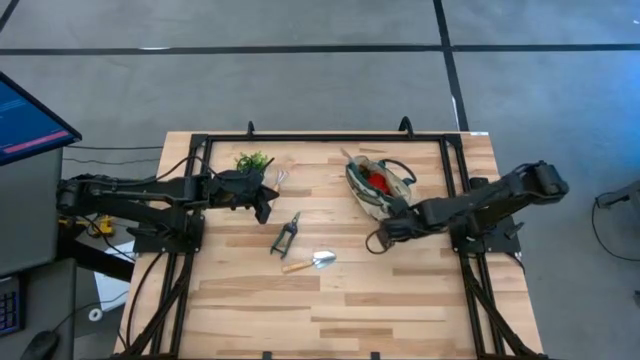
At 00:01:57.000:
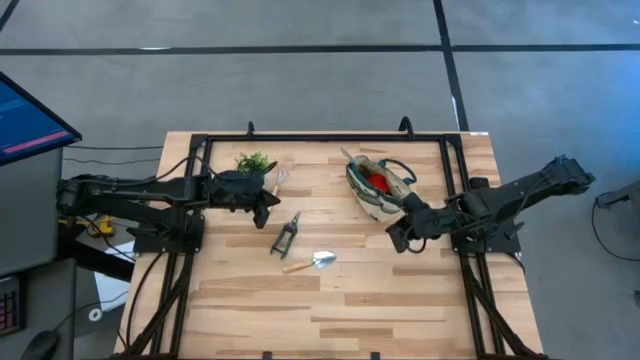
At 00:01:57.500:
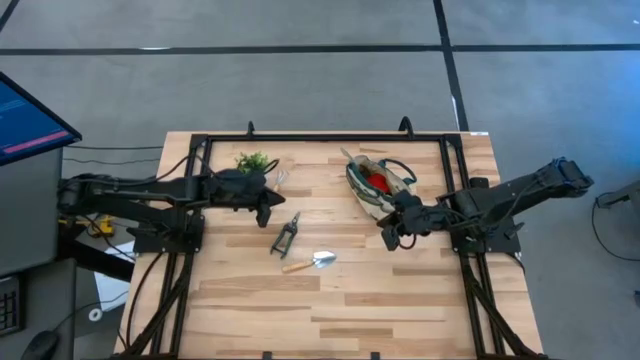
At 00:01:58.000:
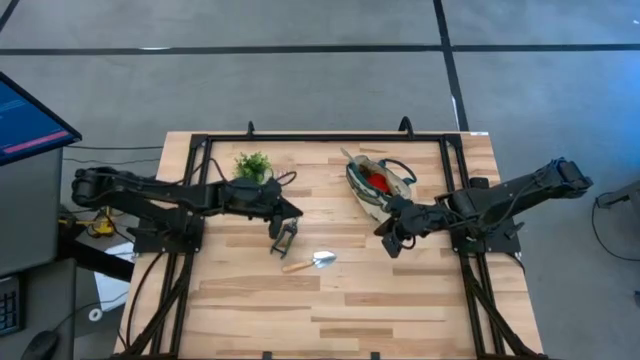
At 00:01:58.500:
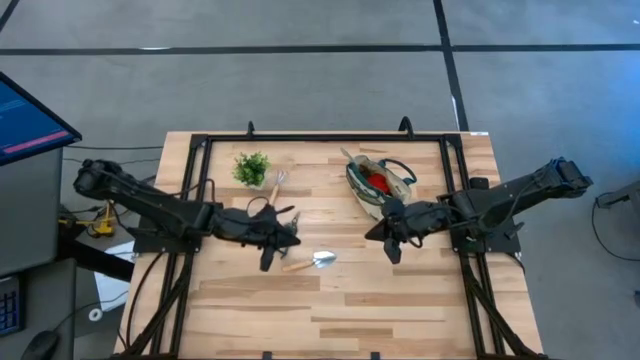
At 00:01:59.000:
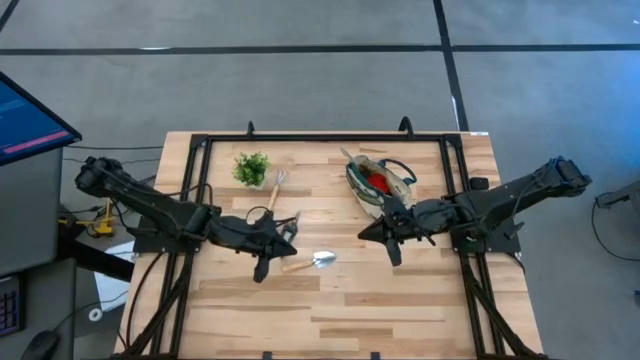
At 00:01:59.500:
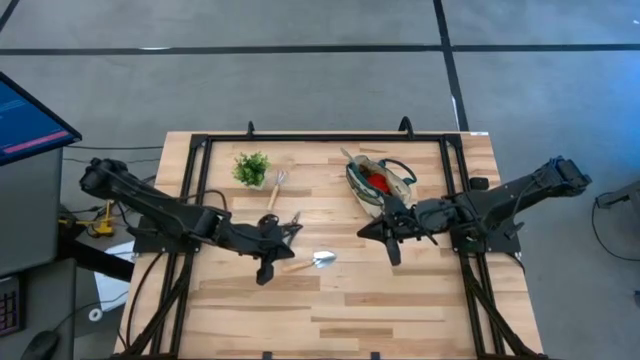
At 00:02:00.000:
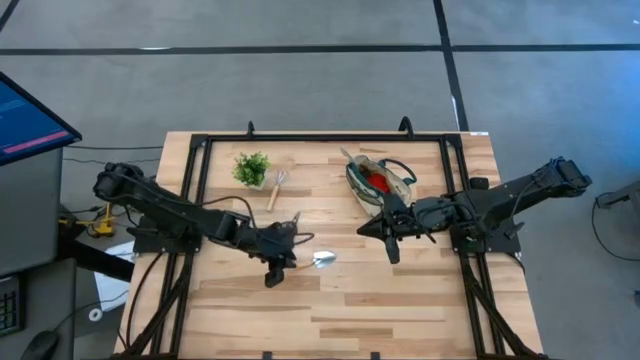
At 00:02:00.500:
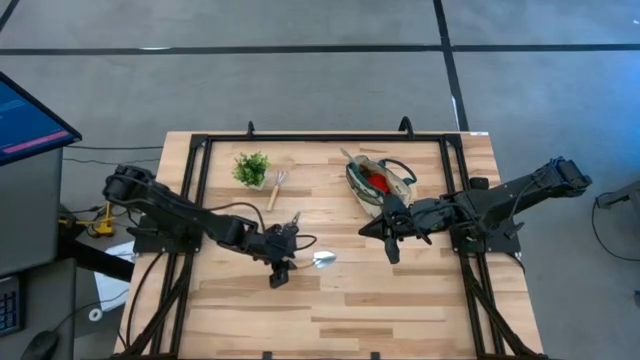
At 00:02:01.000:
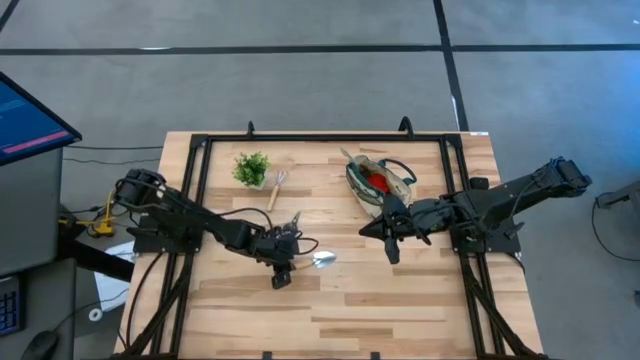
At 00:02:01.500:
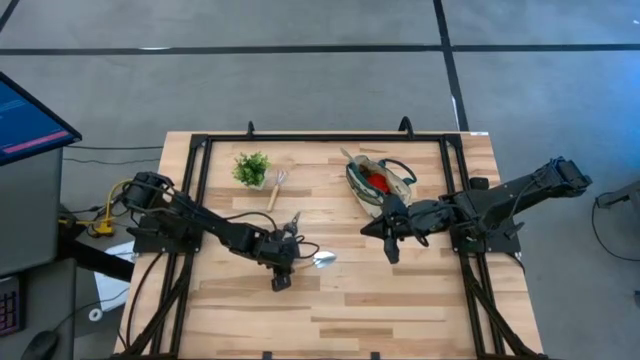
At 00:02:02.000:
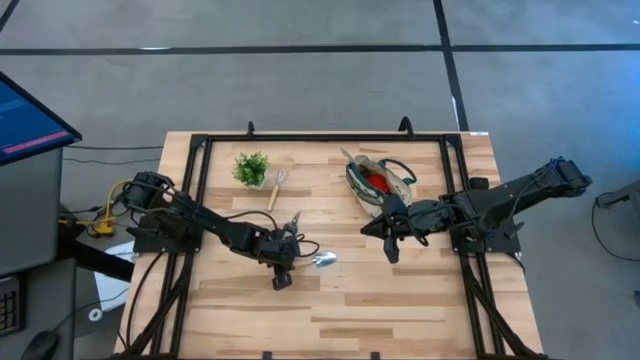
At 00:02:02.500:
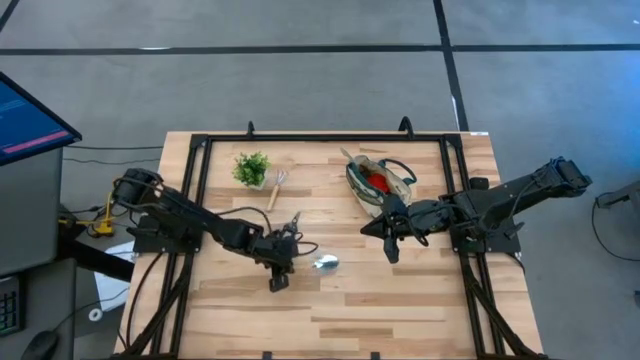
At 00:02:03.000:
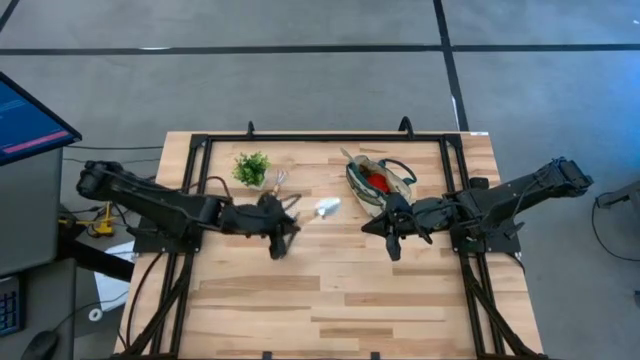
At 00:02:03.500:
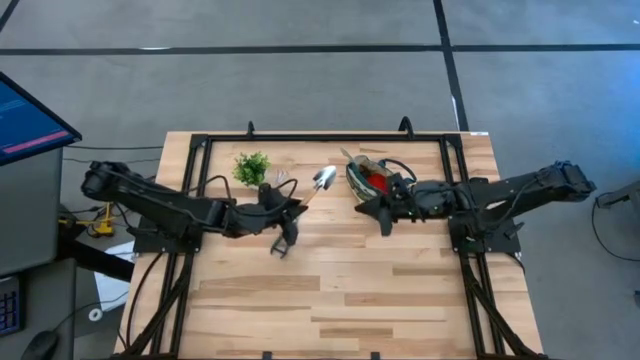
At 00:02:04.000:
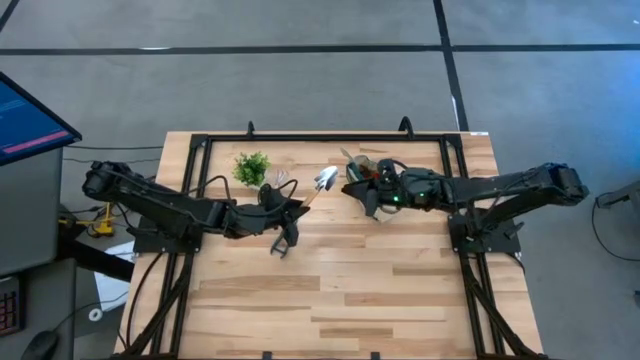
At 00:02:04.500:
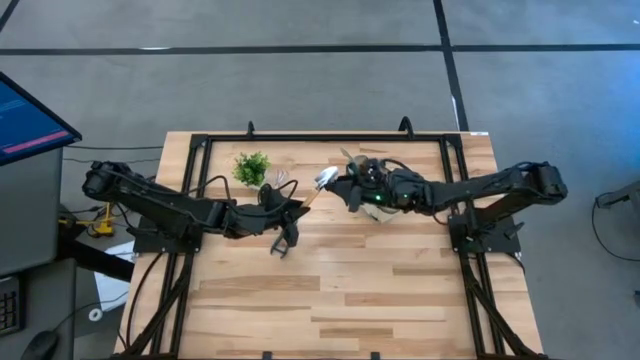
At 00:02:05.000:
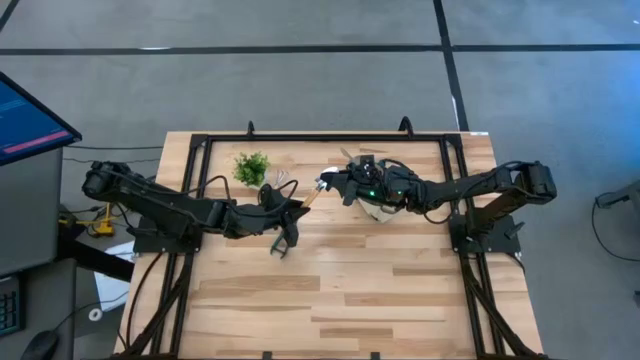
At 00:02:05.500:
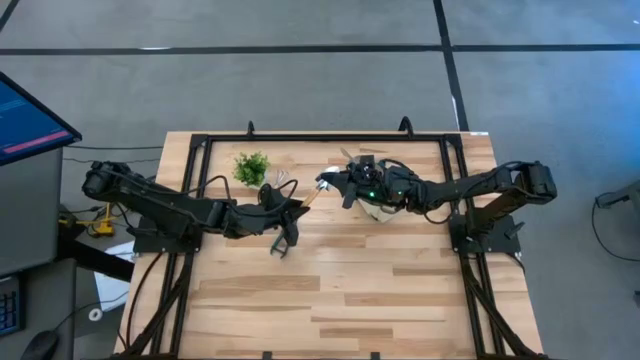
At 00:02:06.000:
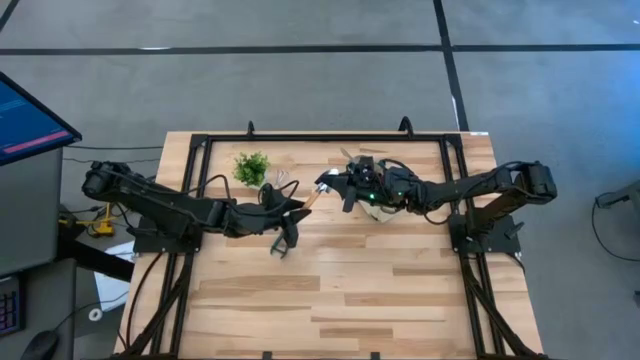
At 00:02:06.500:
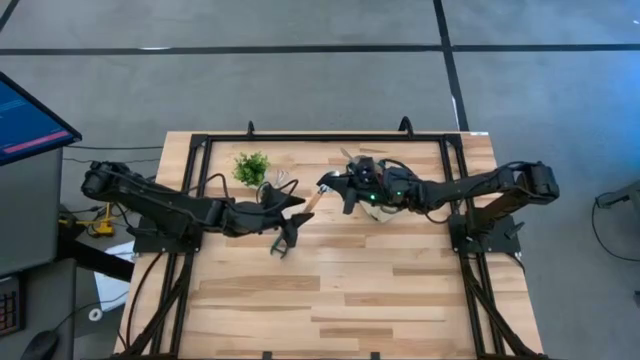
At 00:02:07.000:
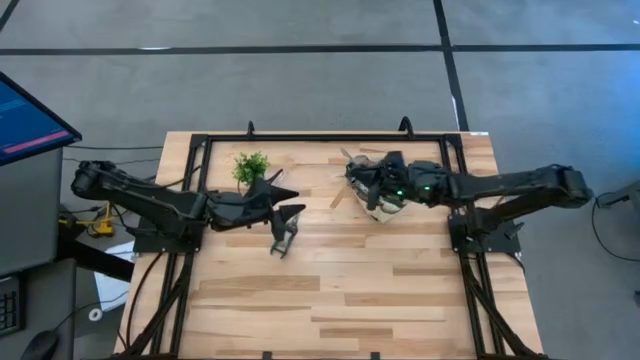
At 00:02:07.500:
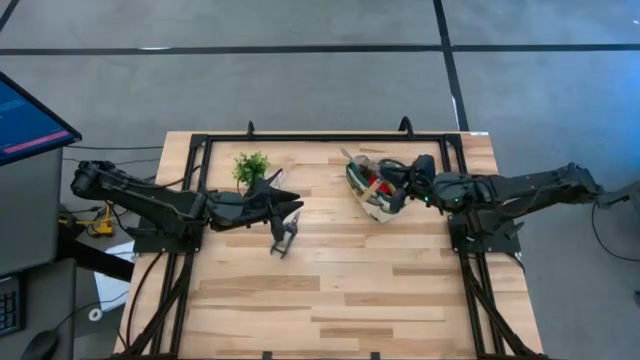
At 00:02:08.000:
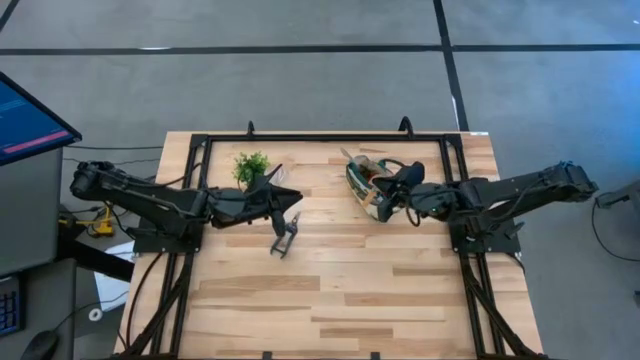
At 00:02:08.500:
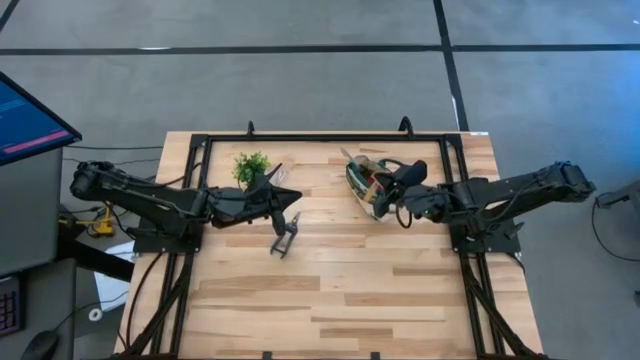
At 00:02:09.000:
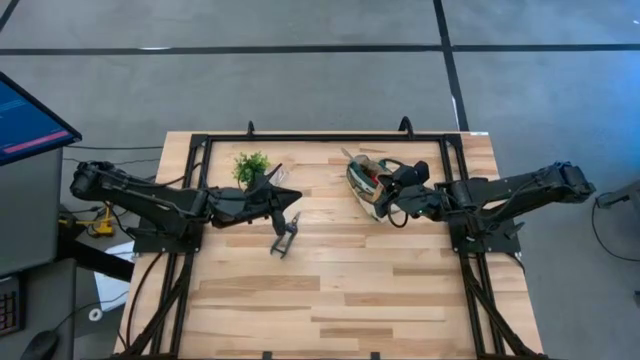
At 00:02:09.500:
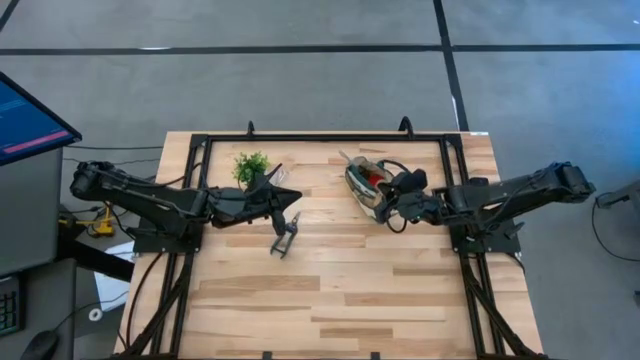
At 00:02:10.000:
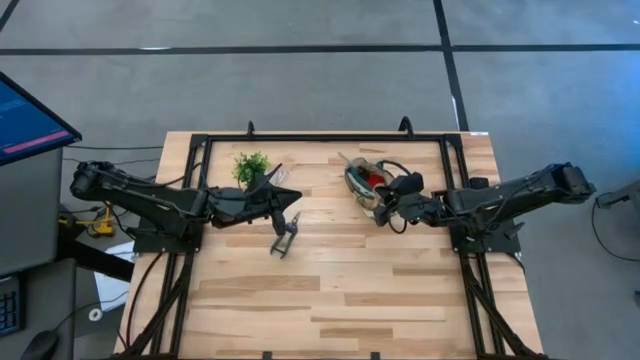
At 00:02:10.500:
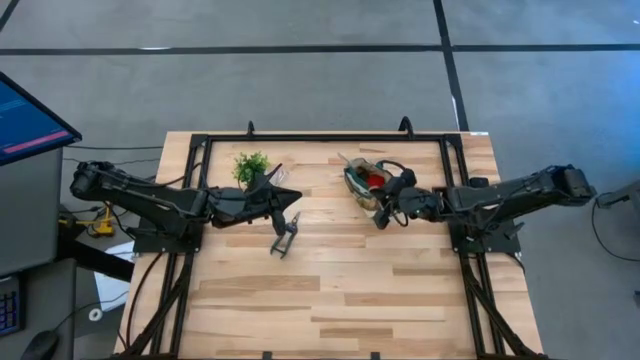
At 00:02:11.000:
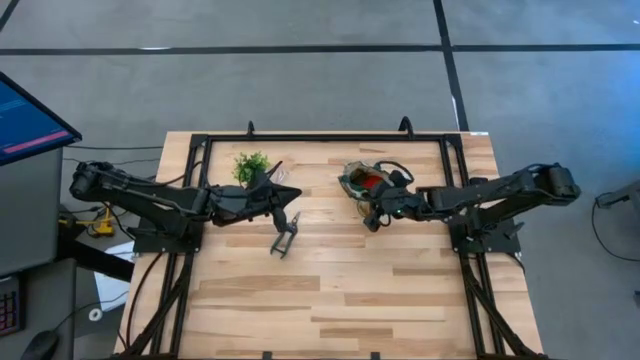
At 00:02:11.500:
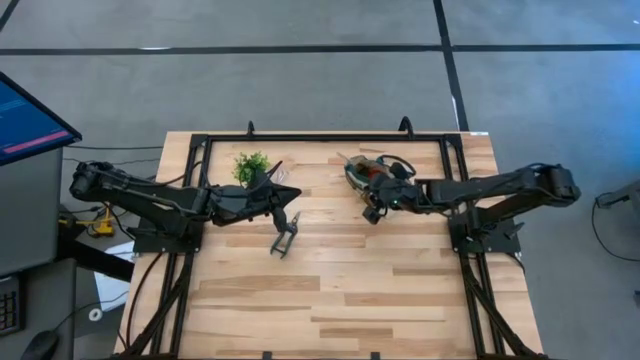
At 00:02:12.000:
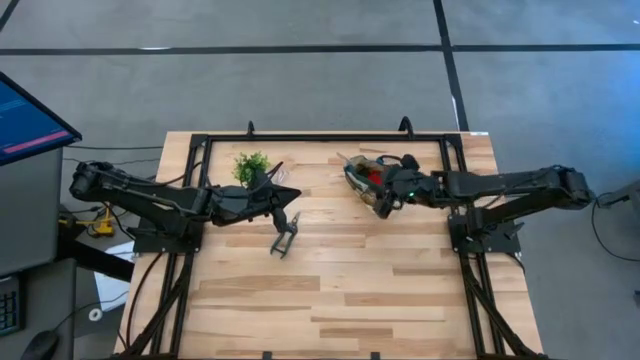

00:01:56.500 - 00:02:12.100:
Task: Pick & Place Garden tools in Gardening bag
Put the trowel into the side pocket of the gardening bag

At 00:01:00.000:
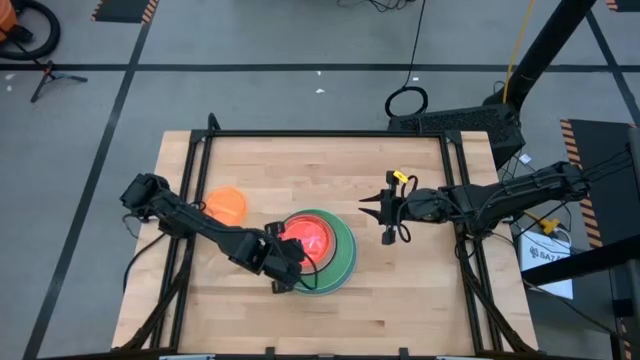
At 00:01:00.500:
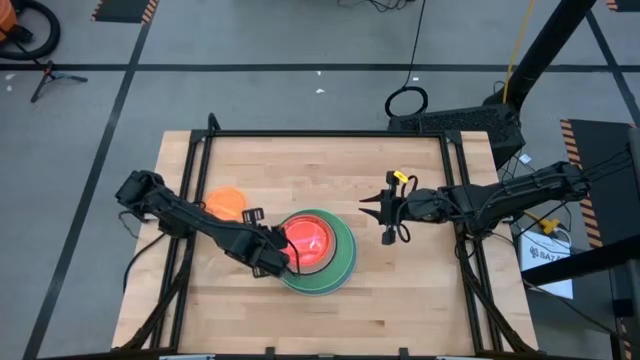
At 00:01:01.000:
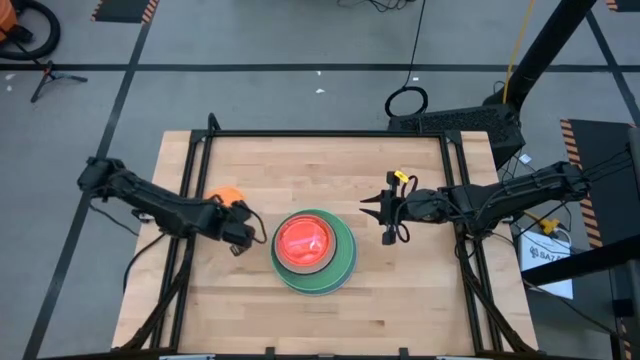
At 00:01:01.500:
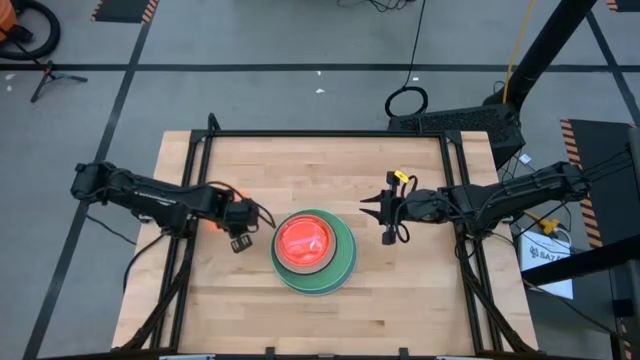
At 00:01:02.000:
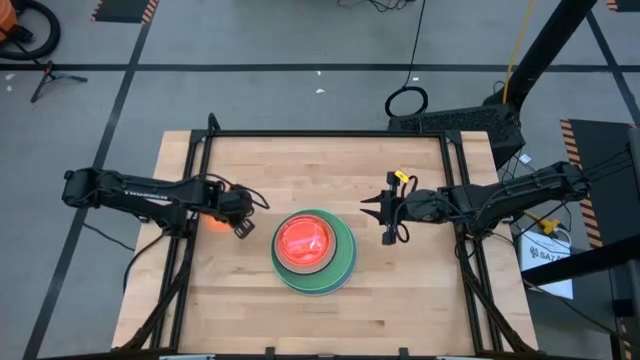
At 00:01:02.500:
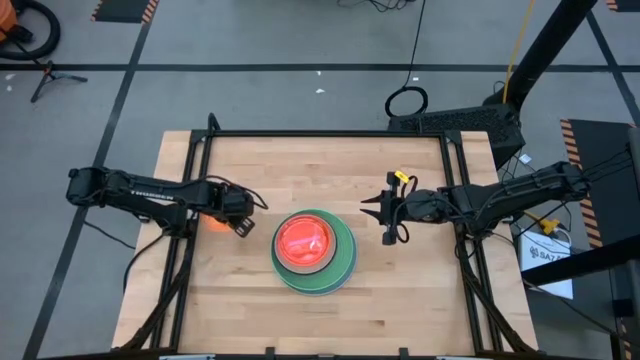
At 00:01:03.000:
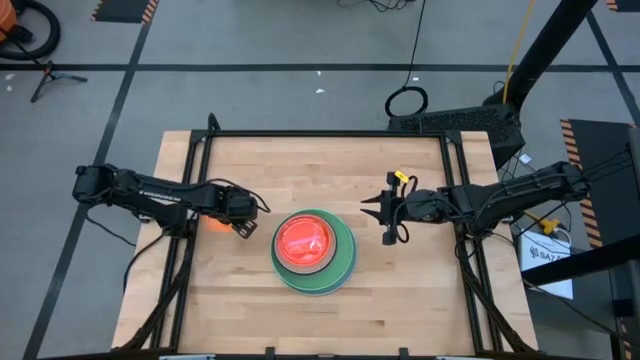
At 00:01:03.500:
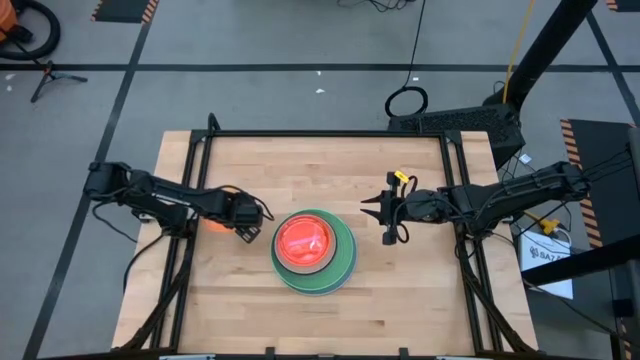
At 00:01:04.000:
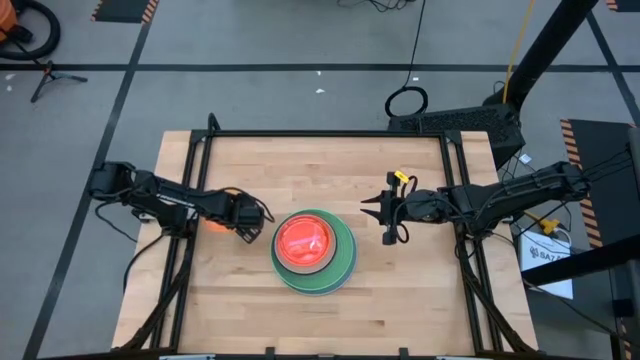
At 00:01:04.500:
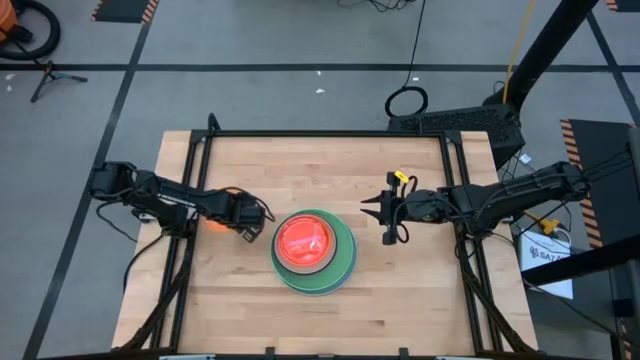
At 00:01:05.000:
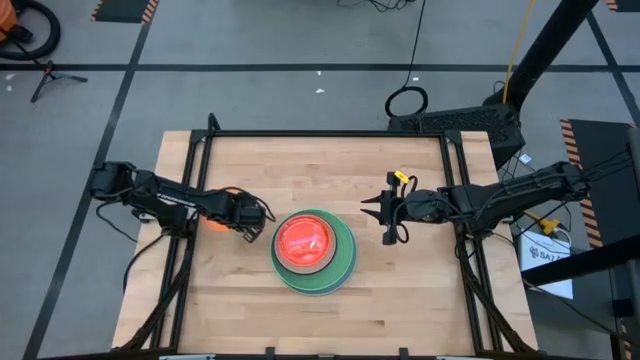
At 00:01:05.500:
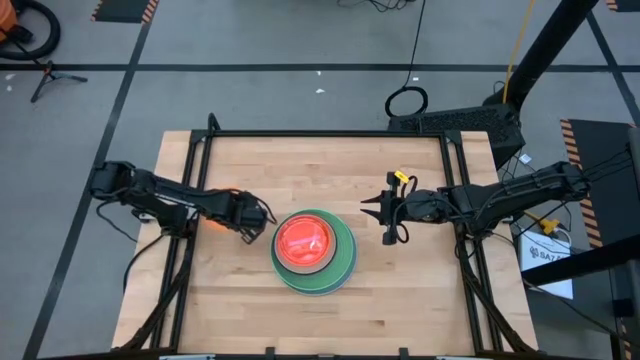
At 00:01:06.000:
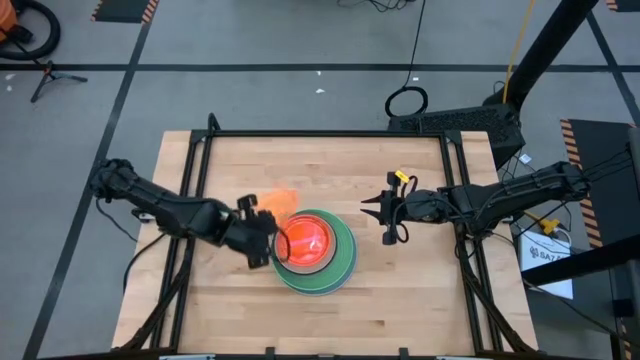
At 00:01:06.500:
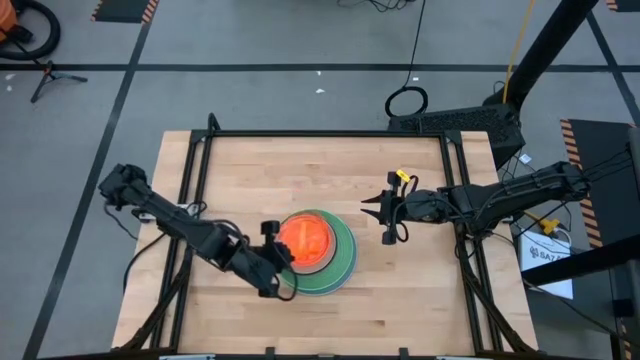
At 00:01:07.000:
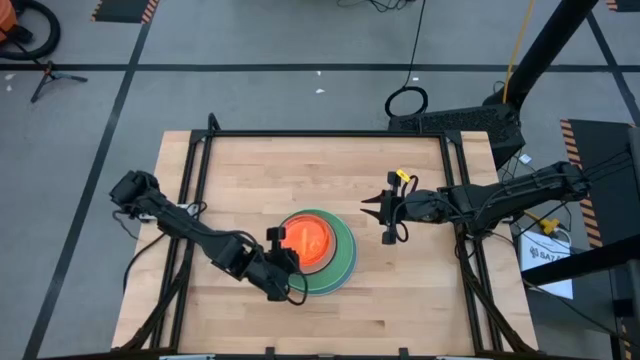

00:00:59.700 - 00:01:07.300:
Task: Stack plastic plates
Stack the orange plate on the pink plate
